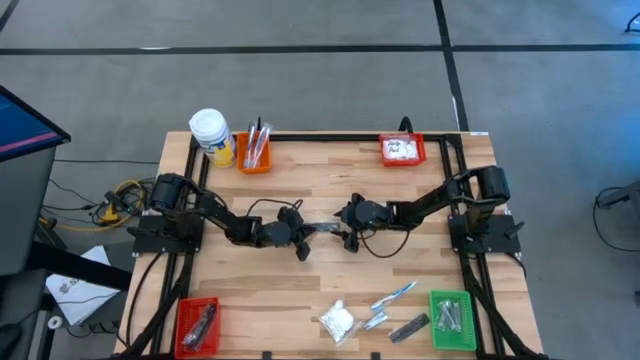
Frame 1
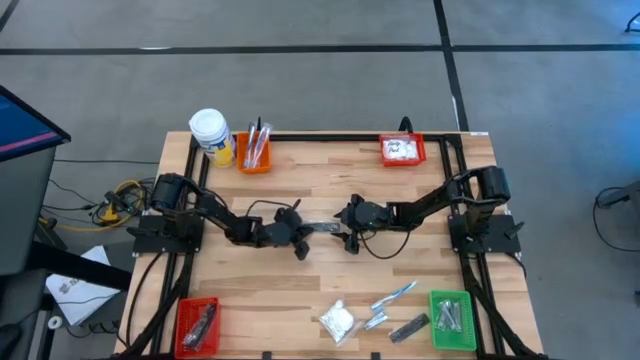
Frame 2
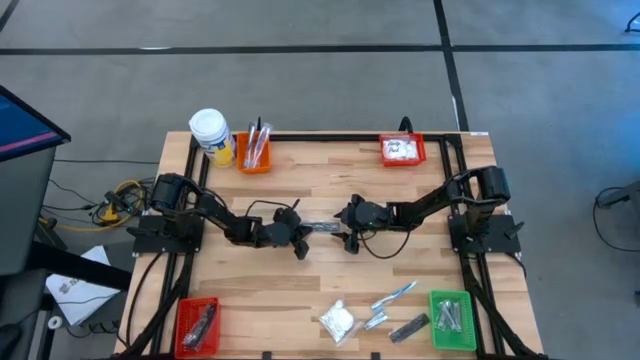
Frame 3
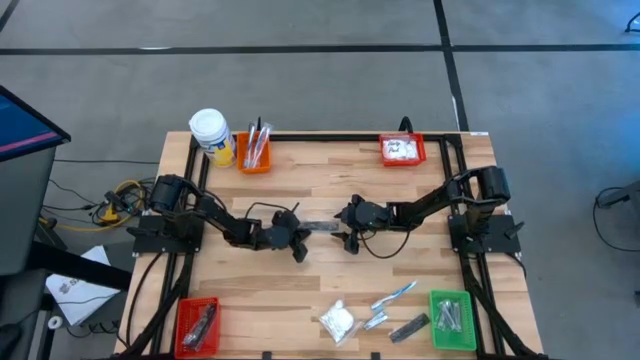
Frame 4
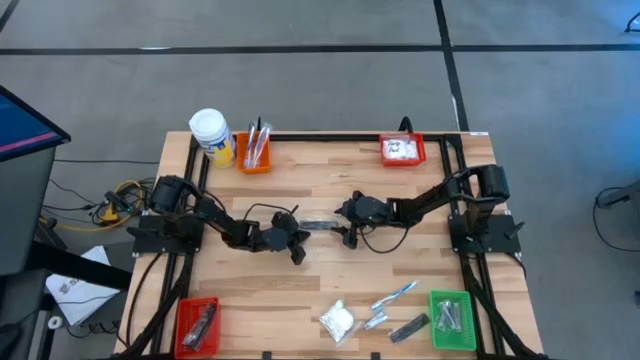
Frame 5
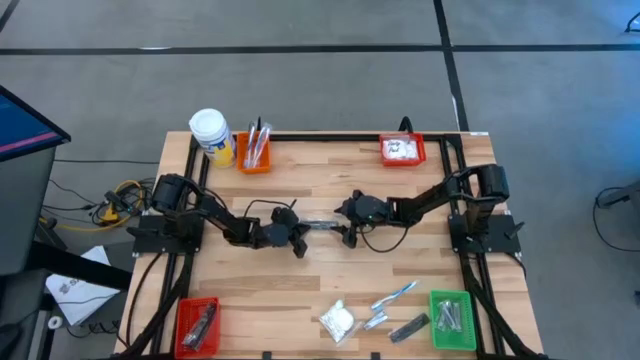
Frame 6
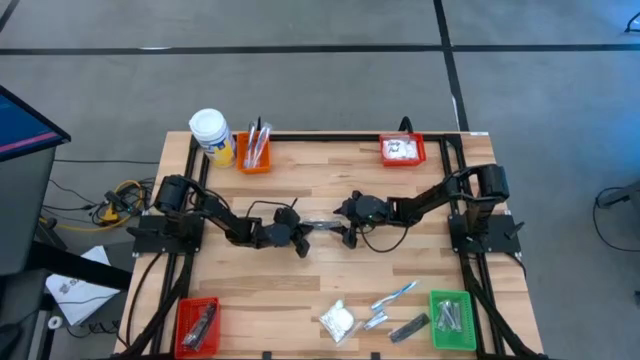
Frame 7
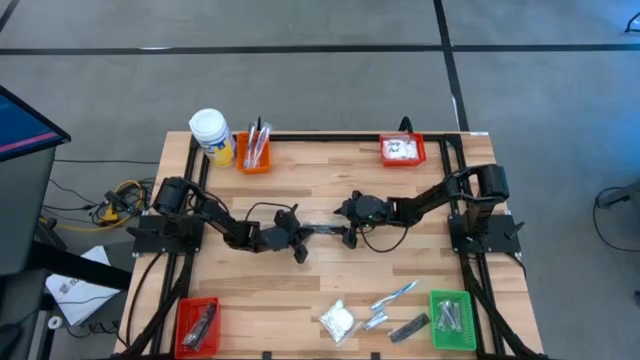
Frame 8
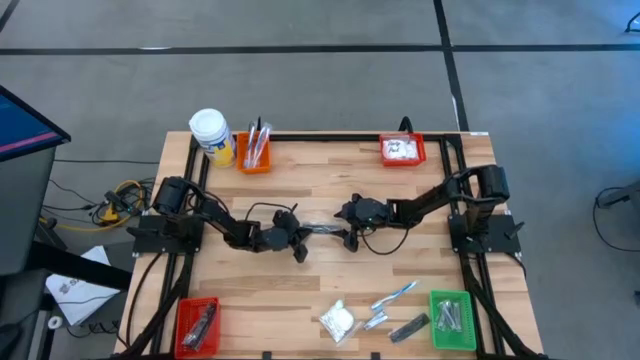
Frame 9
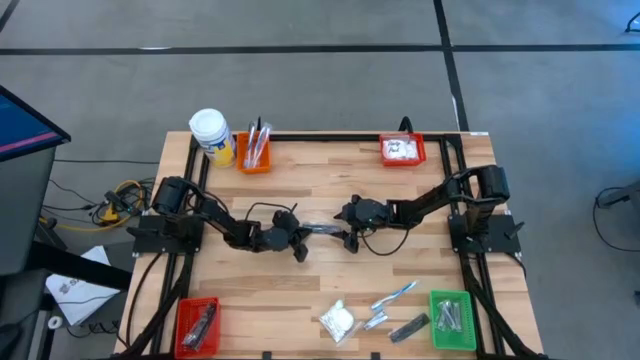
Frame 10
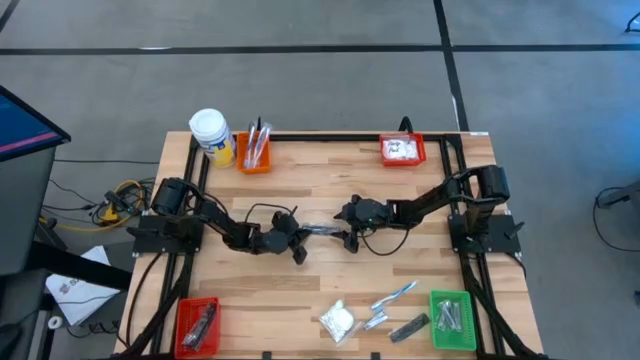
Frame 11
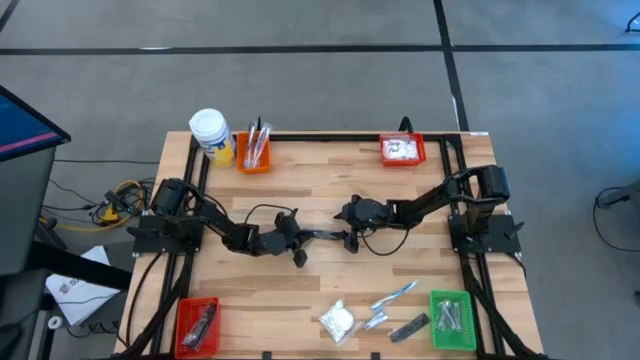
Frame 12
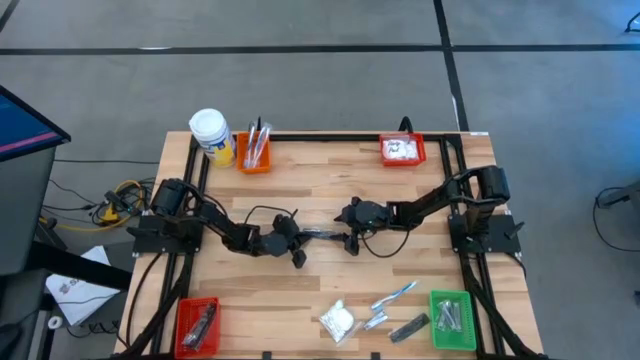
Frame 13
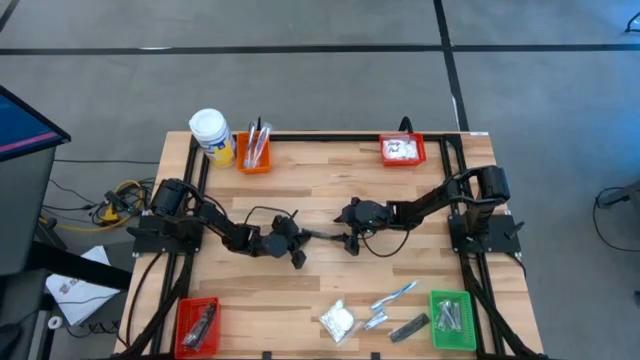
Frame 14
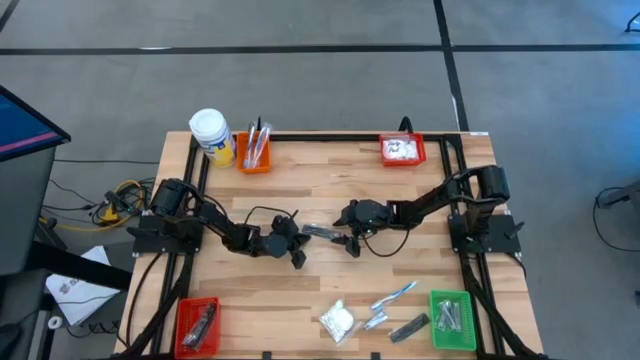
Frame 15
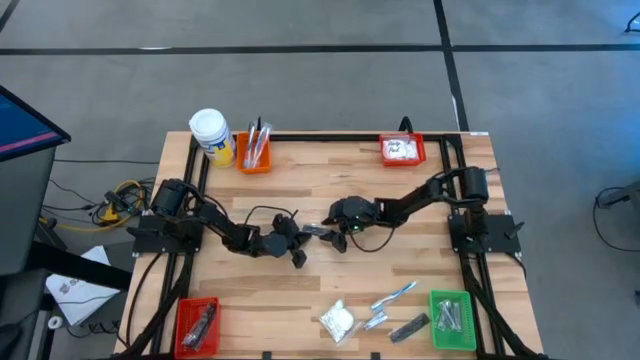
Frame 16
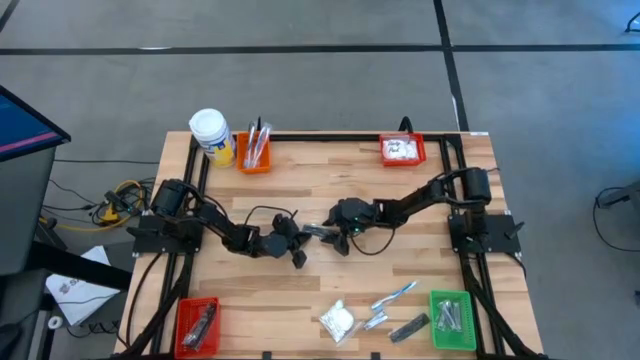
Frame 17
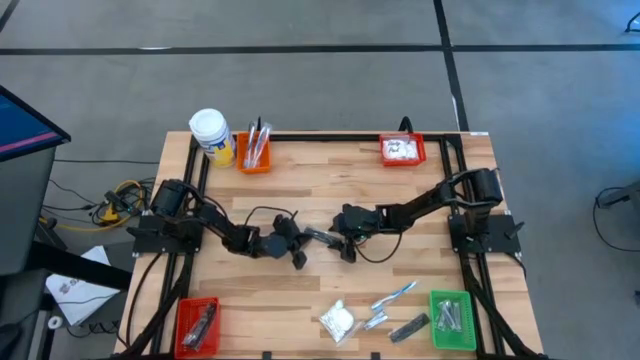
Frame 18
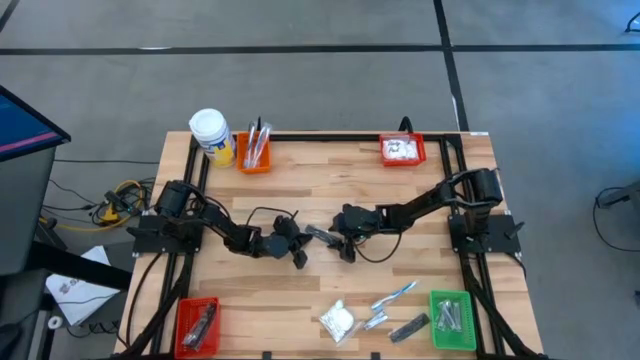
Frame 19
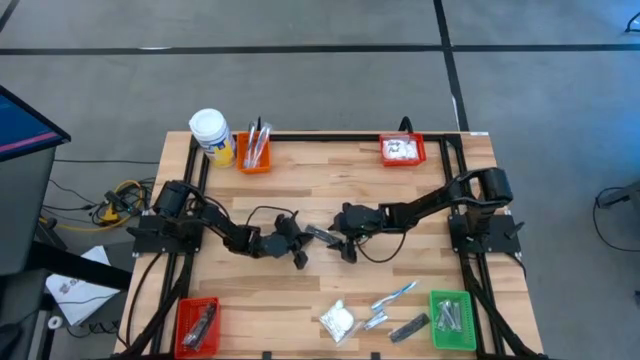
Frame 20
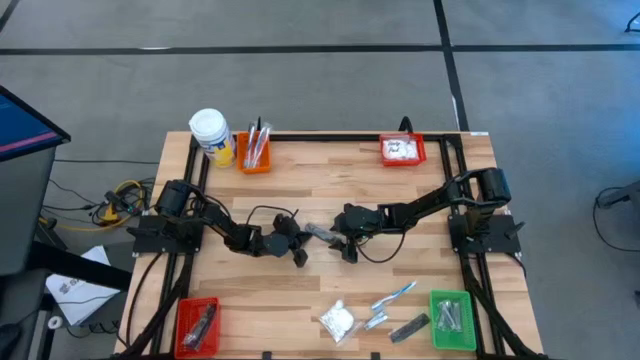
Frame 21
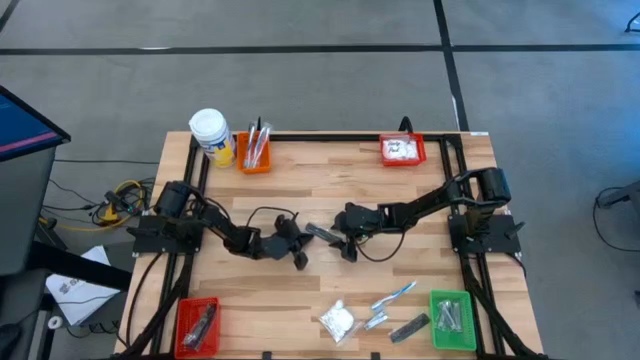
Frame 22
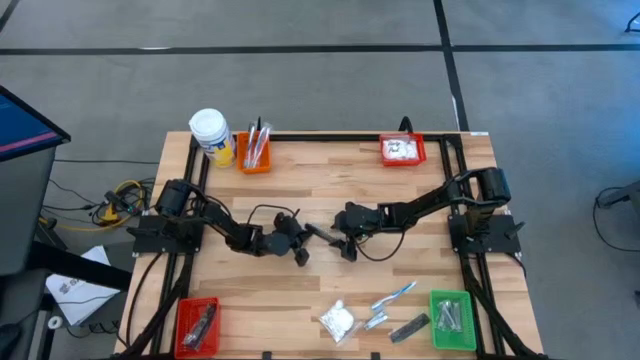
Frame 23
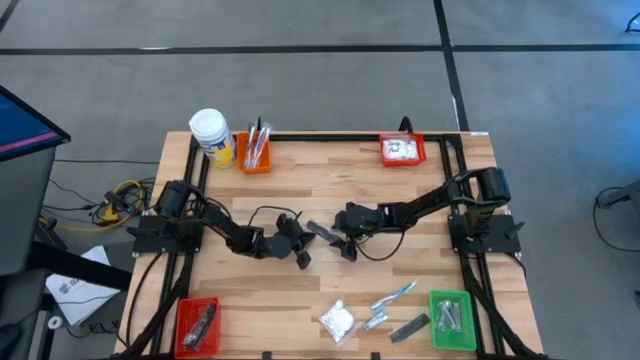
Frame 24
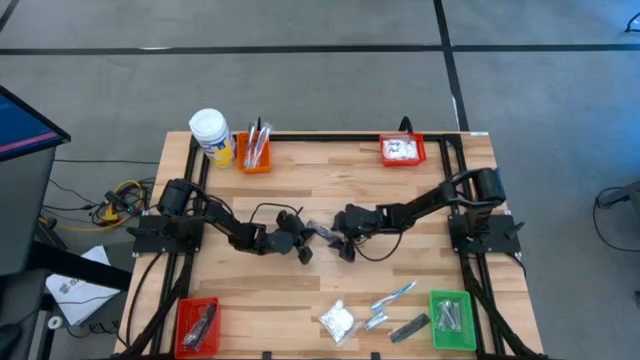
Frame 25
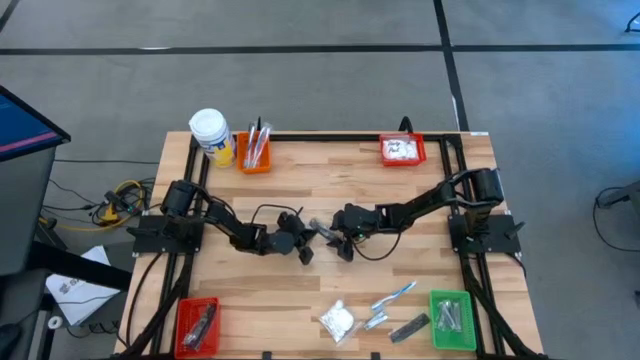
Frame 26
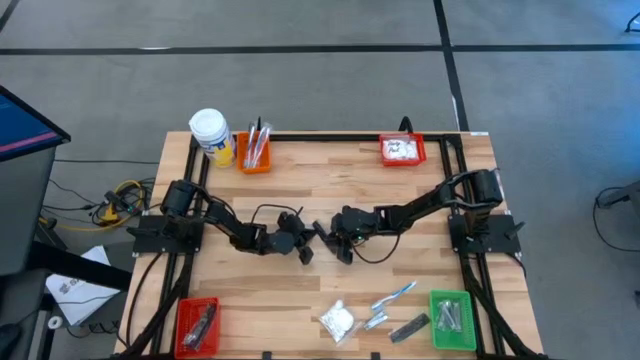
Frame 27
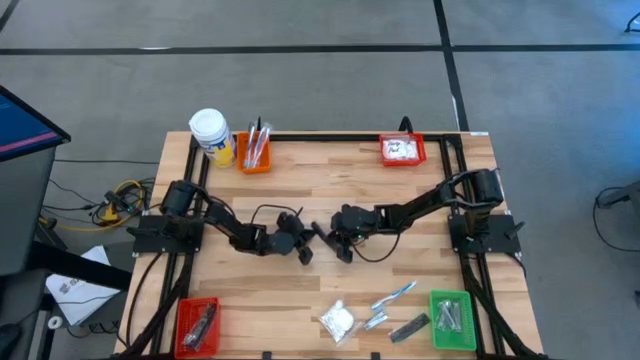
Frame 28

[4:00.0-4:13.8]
Task: Pick & Place Travel size toiletries
Put the left comb into the bottom red bin

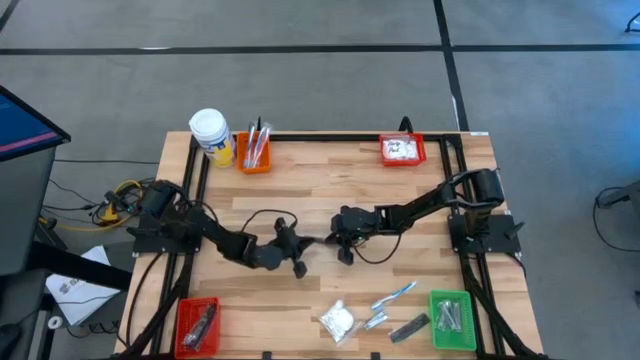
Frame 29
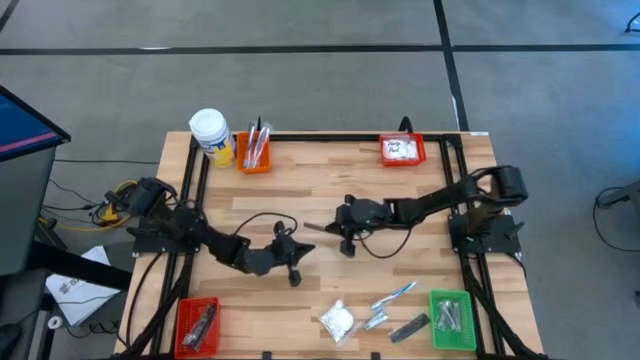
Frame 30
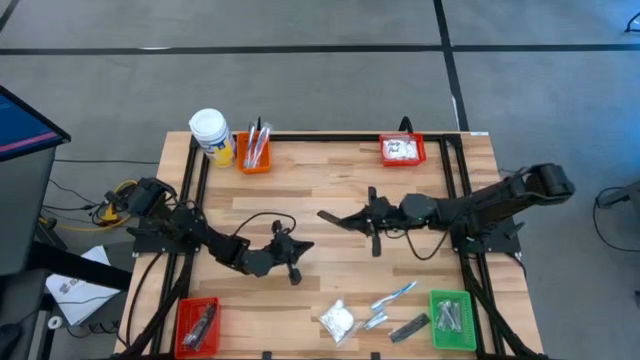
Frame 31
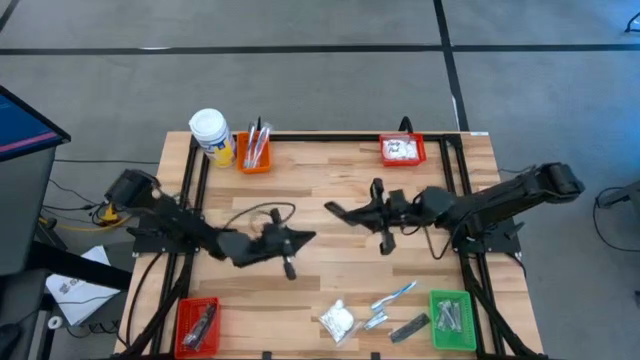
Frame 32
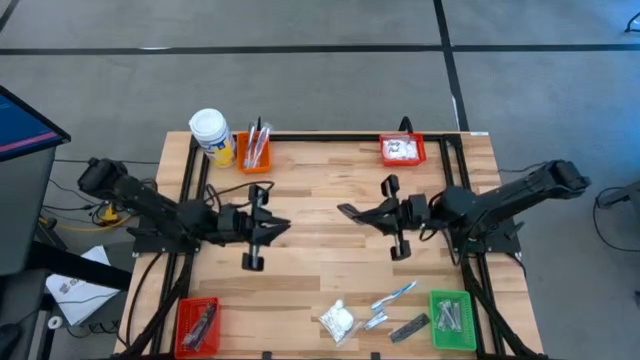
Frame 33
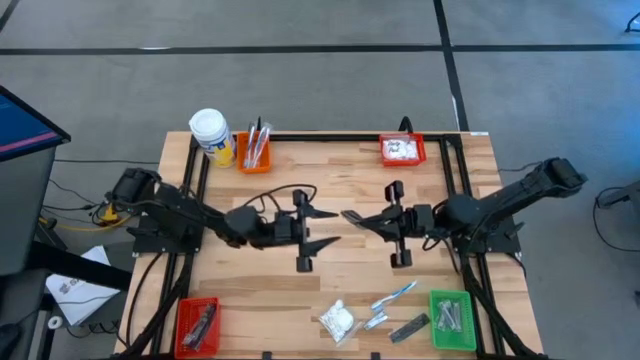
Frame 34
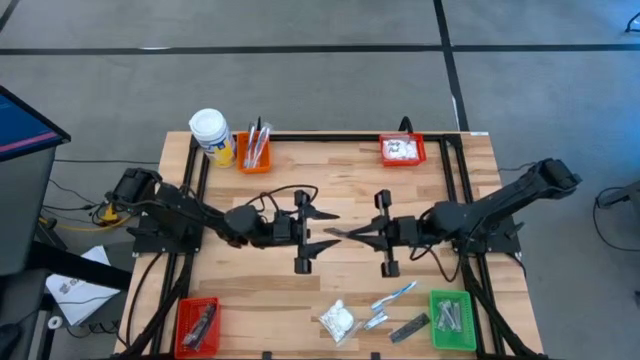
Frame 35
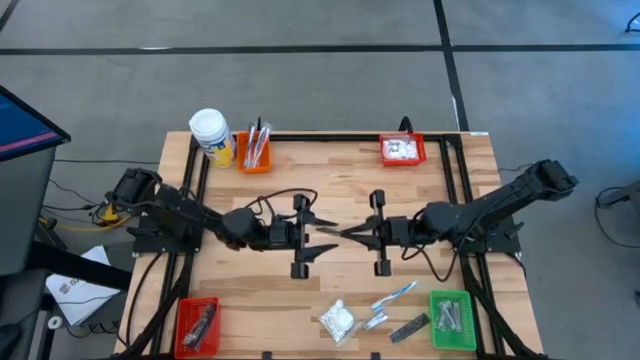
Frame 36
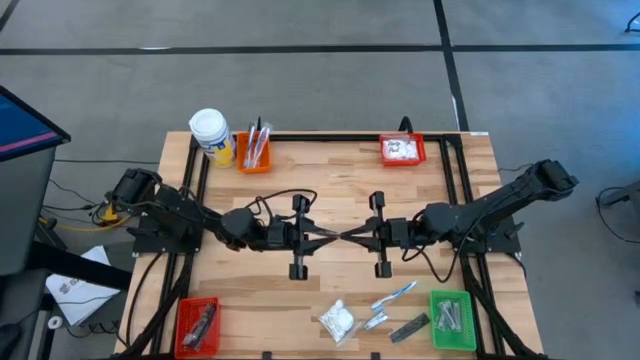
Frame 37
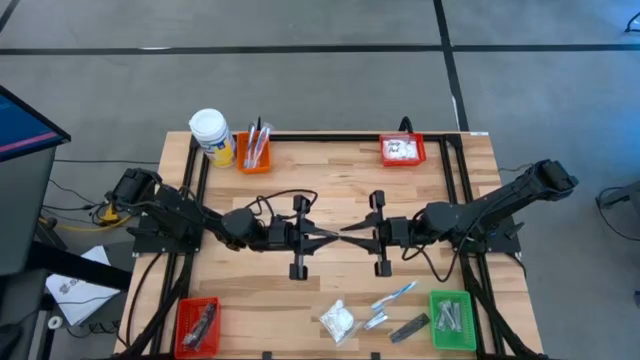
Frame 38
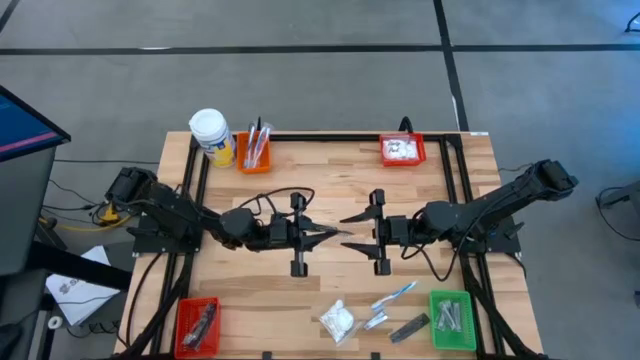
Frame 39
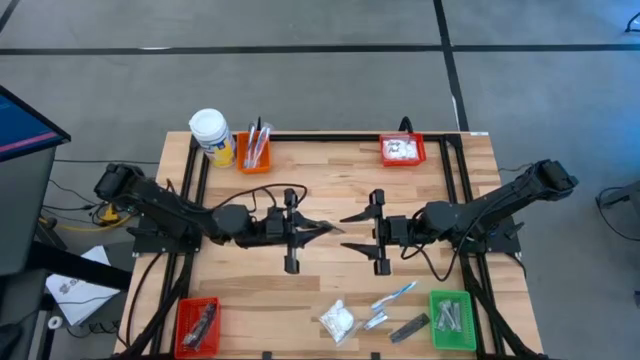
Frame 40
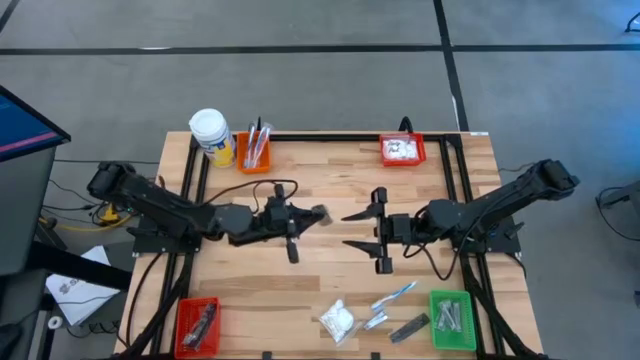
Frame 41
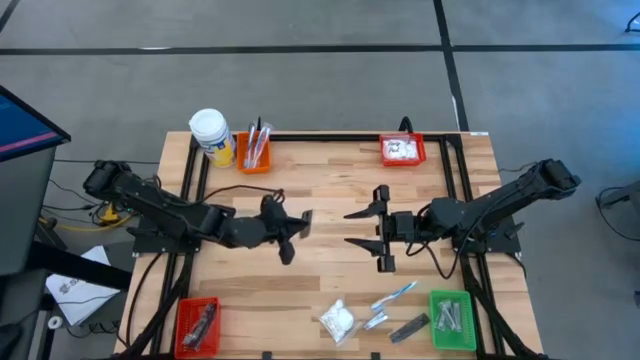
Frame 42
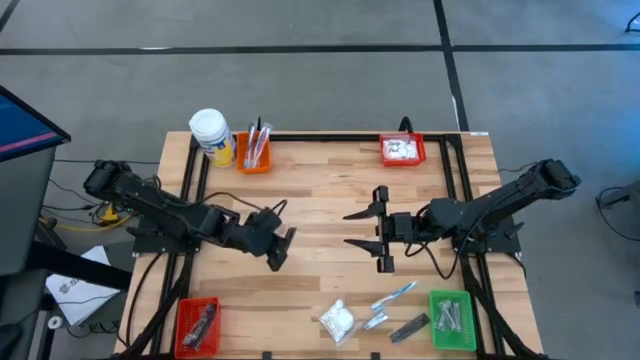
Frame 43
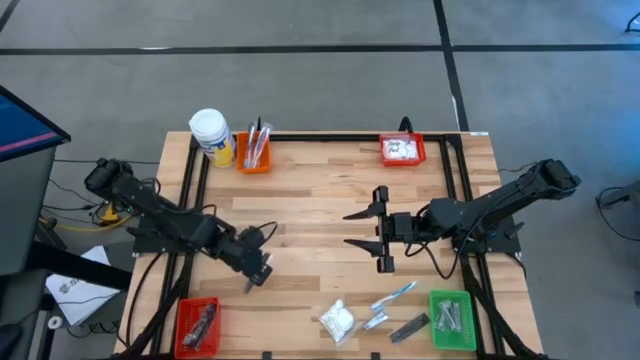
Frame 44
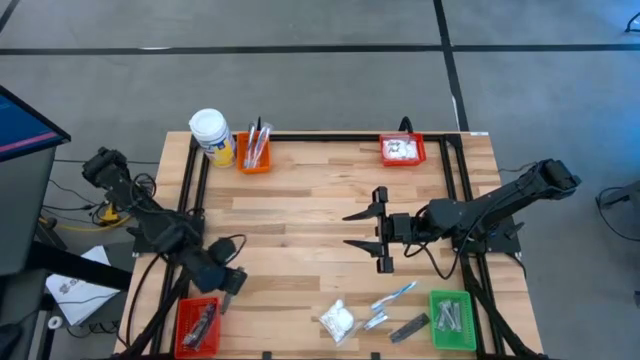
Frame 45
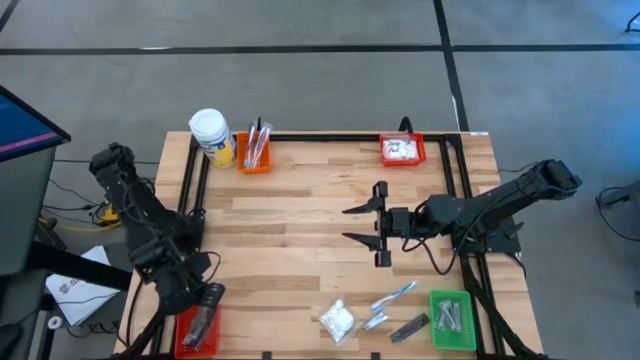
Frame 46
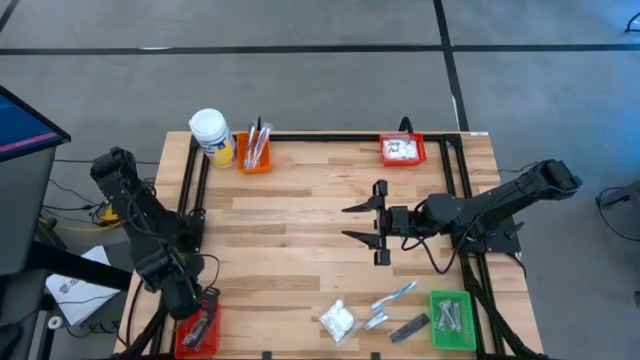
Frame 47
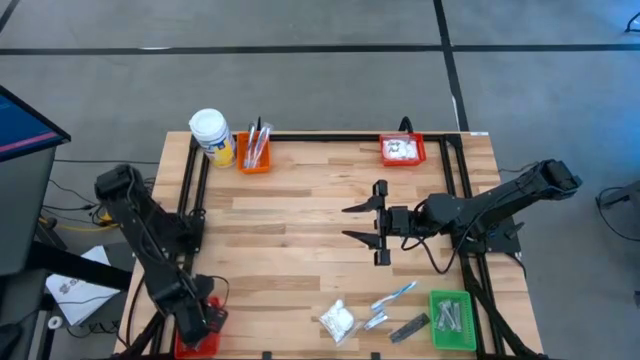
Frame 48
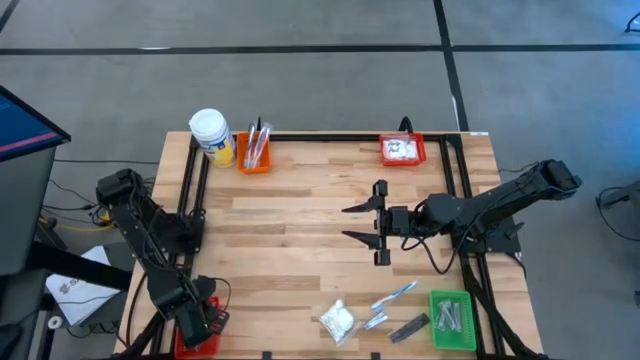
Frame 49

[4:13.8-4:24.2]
Put the left comb into the bottom red bin
